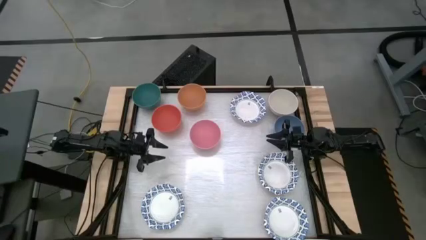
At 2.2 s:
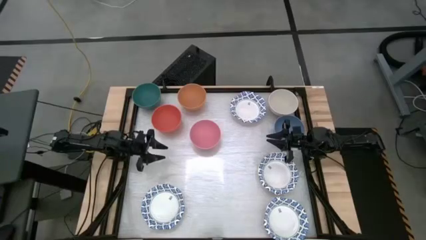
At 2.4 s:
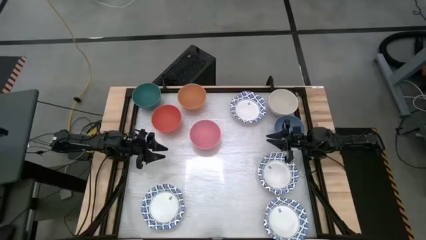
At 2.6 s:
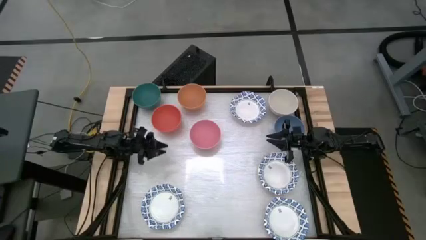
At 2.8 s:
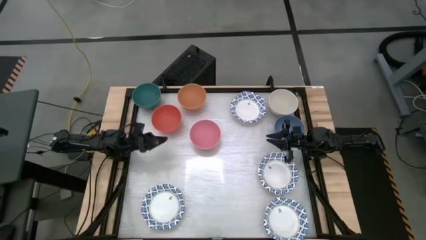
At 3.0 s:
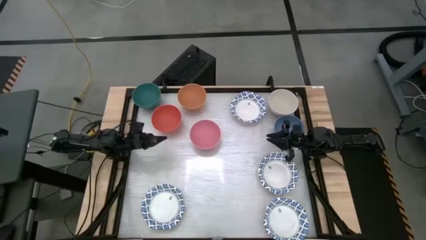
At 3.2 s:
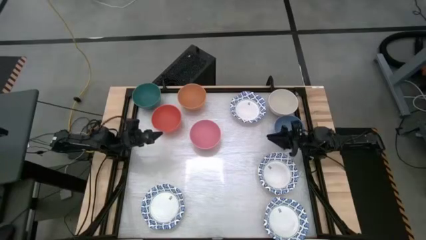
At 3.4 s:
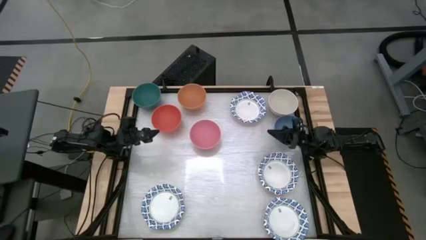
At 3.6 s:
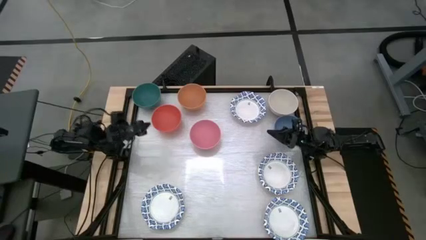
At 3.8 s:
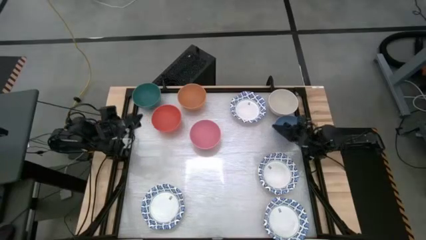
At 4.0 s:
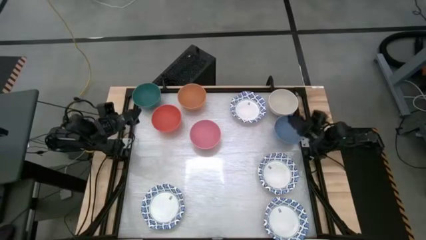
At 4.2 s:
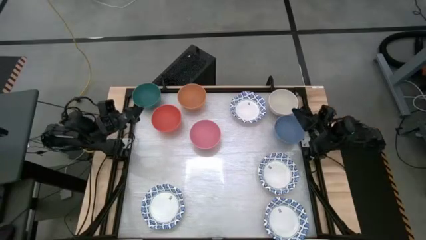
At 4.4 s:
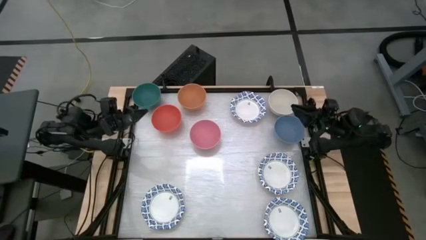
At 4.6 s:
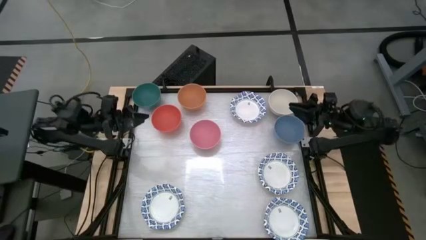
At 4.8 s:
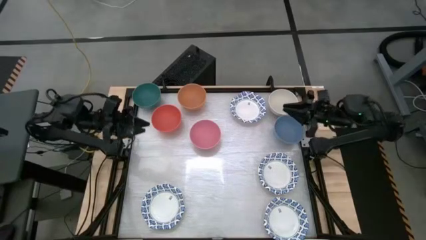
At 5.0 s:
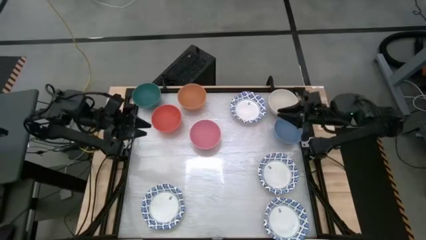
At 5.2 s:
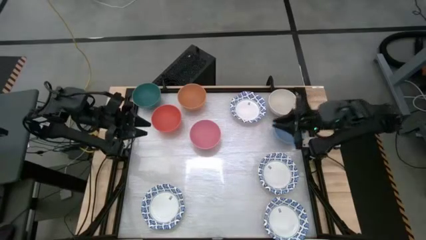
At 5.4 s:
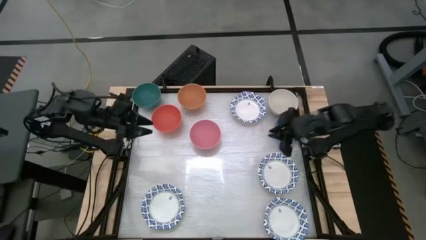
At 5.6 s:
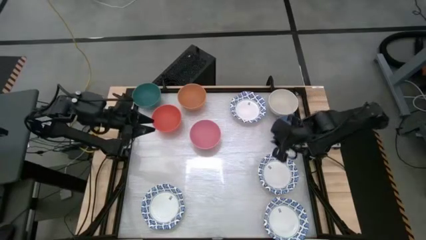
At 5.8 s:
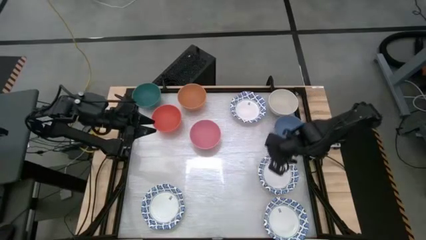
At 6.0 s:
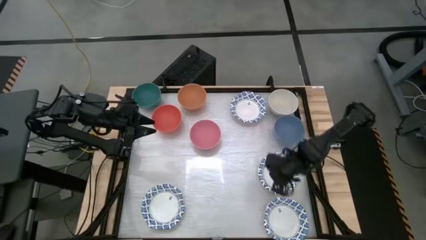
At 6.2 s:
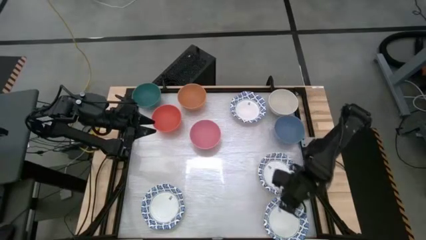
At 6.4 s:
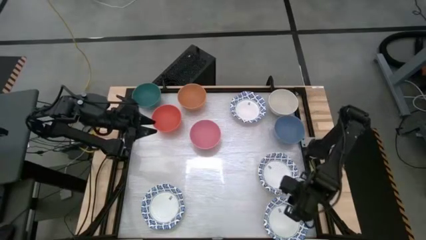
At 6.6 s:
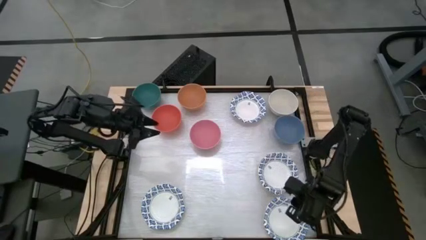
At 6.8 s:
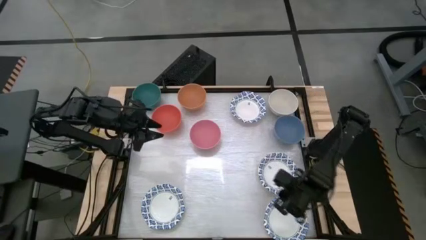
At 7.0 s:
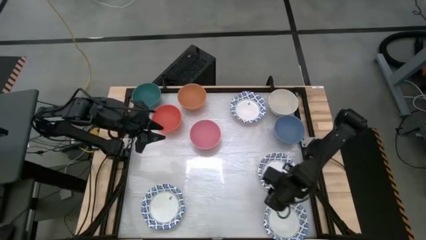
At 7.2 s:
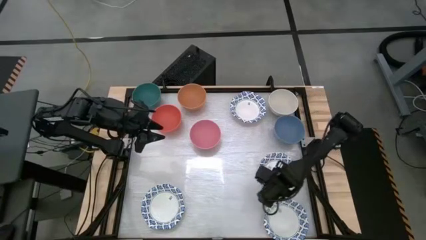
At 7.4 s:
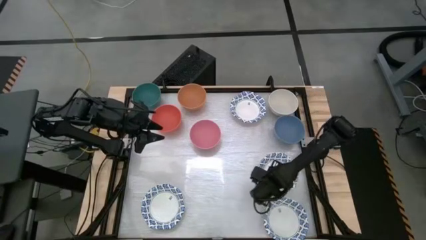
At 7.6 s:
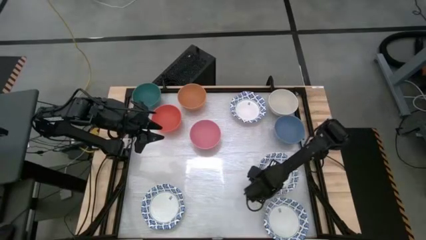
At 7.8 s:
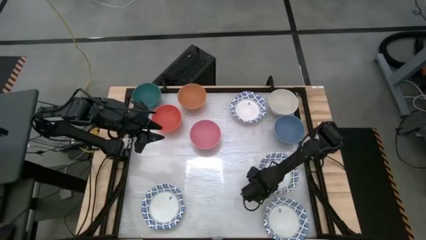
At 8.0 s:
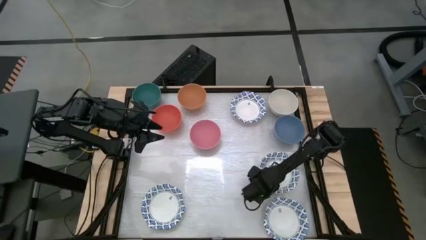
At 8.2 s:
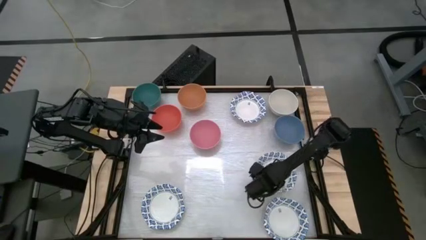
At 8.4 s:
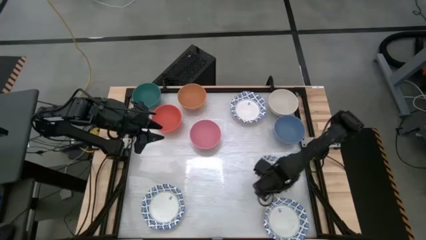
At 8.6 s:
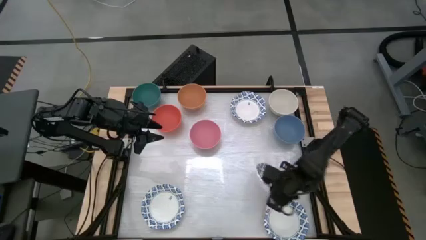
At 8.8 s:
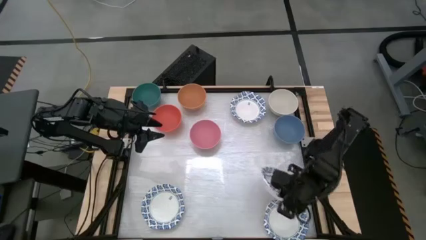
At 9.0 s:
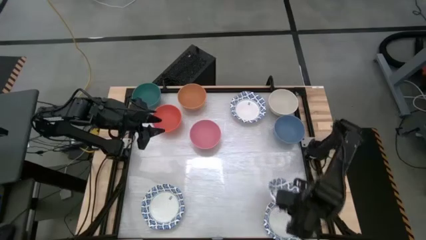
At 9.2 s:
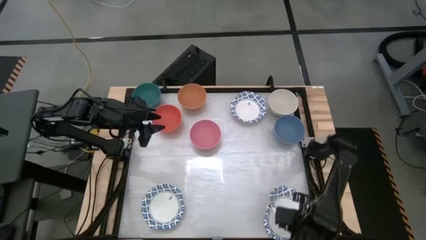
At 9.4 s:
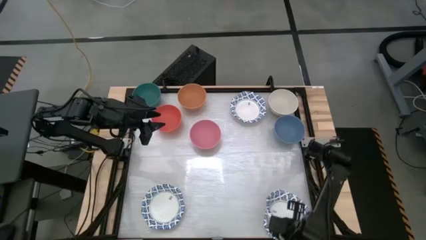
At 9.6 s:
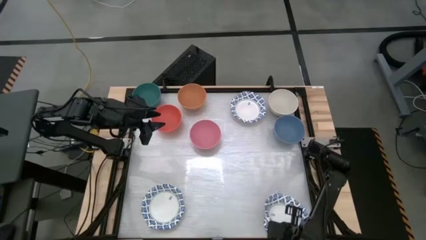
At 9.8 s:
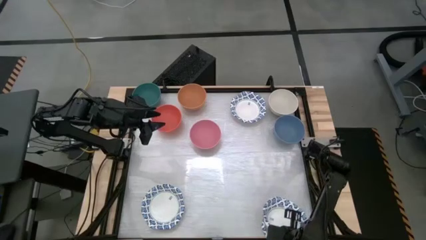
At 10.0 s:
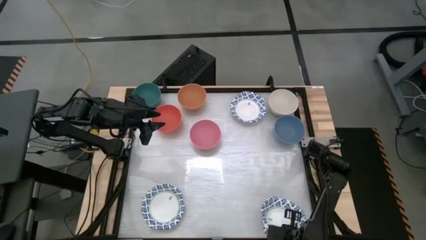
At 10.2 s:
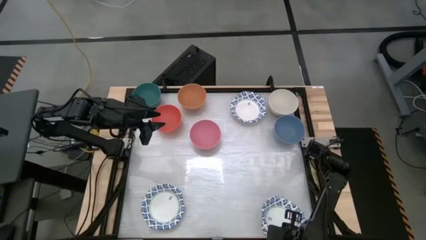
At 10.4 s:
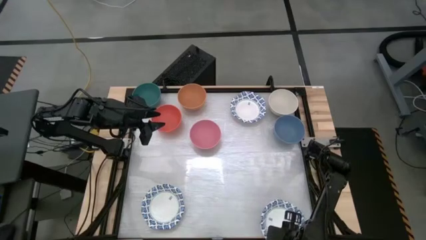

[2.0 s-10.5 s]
Stack the white bowl on top of the bottom right white bowl

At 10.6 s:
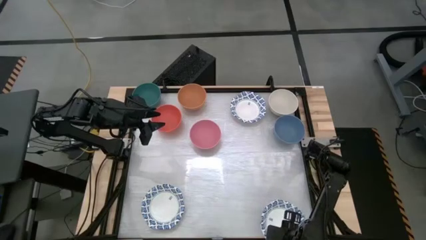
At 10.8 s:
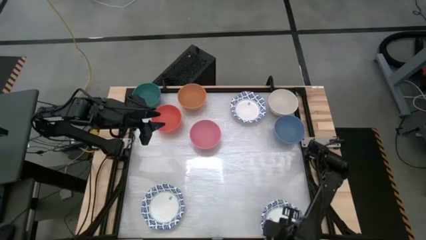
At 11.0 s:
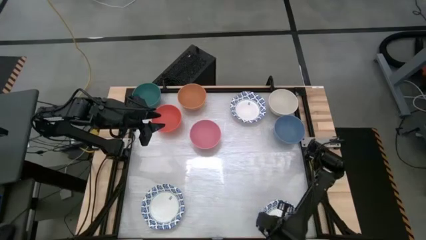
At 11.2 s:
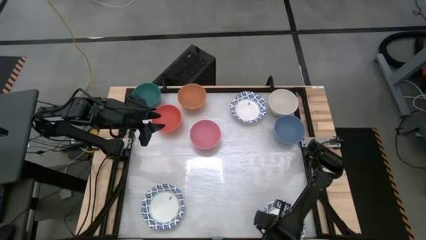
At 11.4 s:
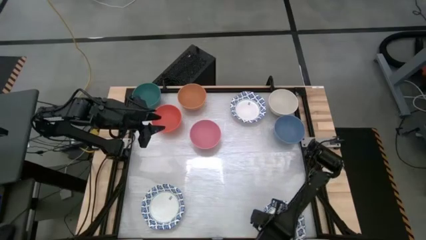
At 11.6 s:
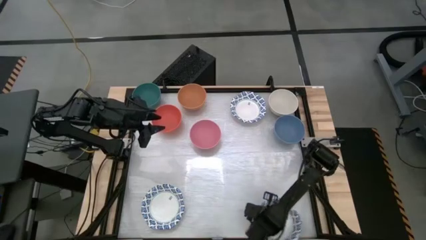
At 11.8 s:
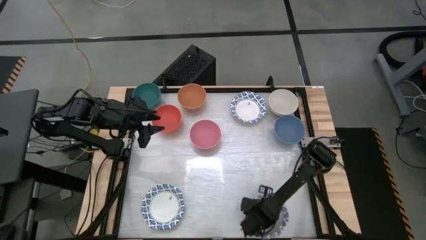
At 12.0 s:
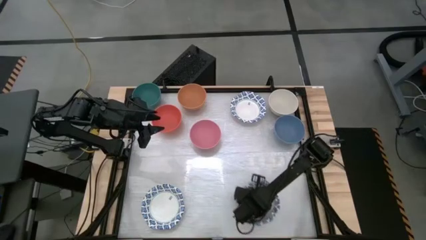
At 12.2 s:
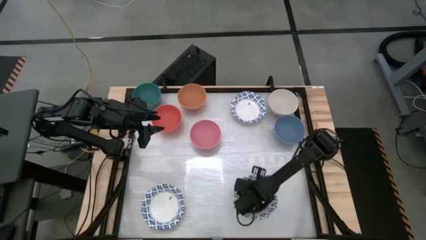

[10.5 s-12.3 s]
Adjust the stacked bowls on the table

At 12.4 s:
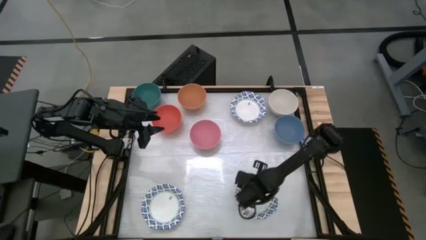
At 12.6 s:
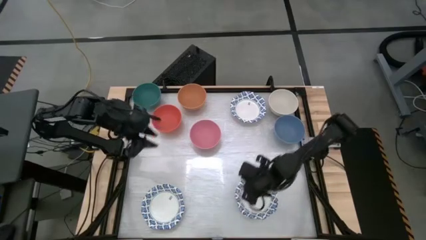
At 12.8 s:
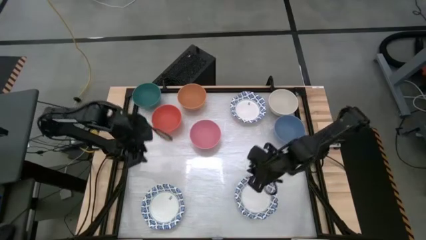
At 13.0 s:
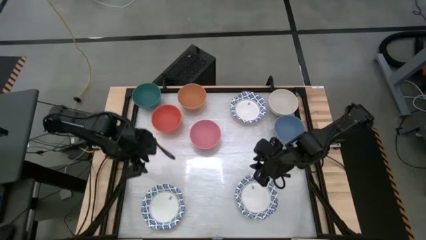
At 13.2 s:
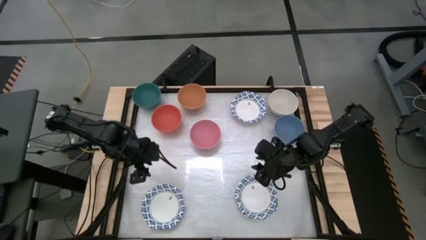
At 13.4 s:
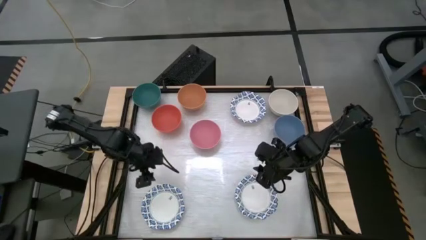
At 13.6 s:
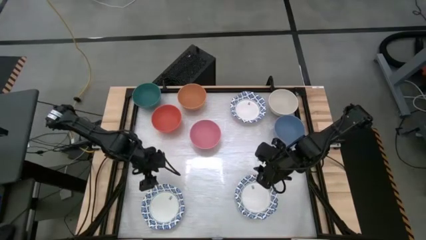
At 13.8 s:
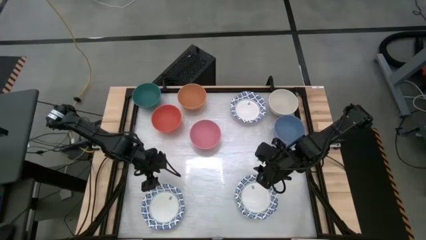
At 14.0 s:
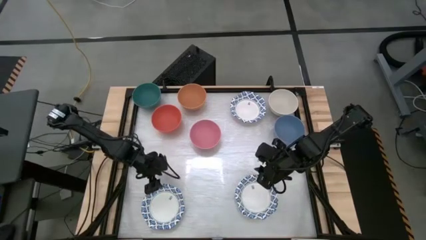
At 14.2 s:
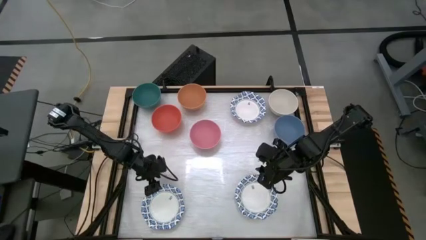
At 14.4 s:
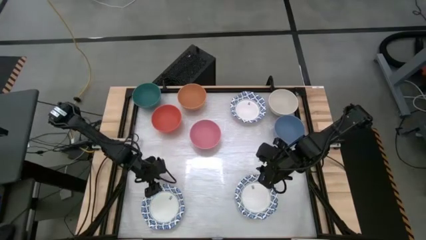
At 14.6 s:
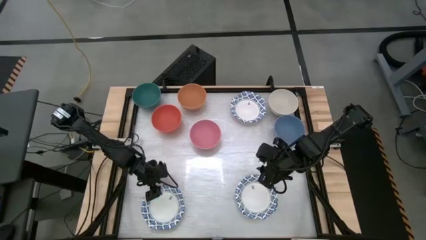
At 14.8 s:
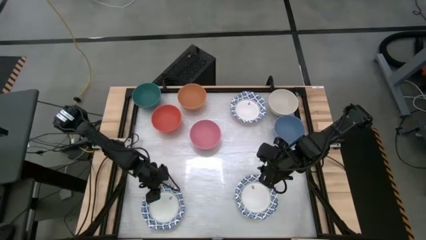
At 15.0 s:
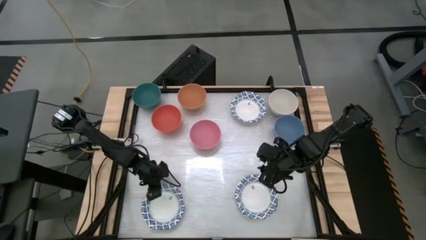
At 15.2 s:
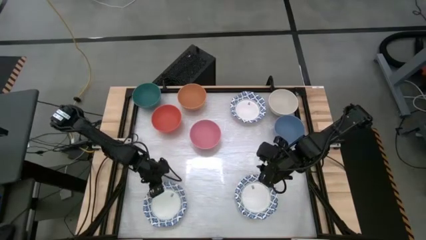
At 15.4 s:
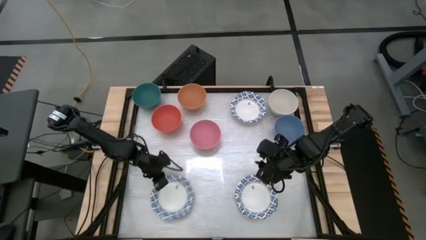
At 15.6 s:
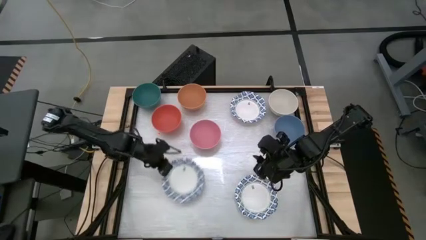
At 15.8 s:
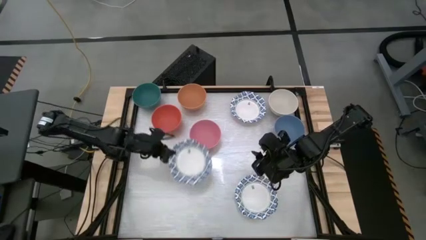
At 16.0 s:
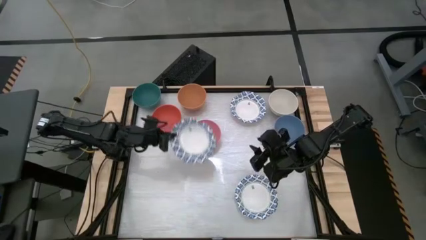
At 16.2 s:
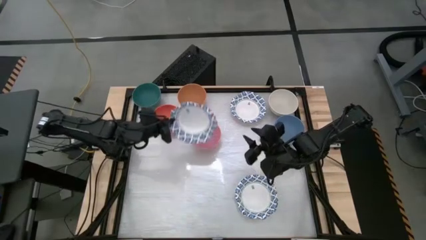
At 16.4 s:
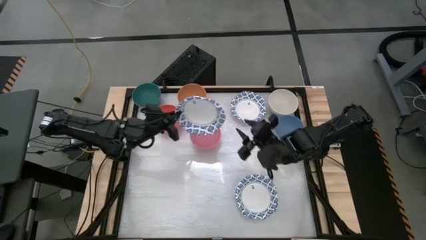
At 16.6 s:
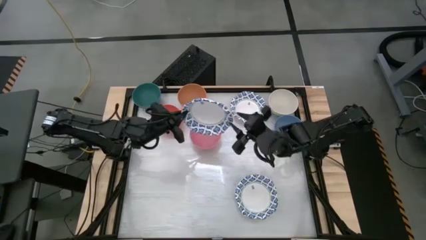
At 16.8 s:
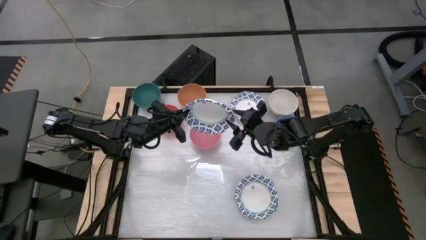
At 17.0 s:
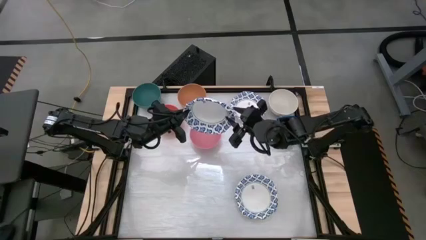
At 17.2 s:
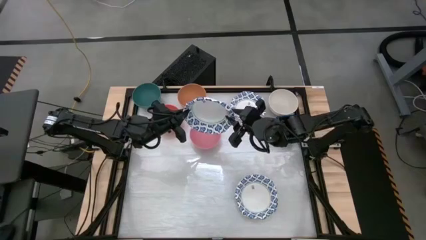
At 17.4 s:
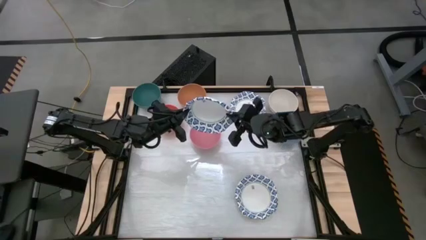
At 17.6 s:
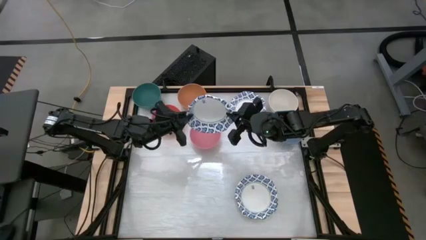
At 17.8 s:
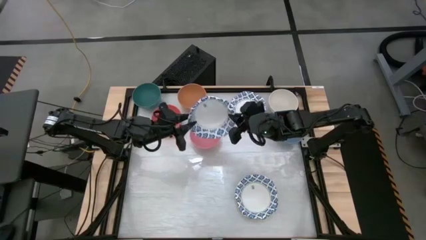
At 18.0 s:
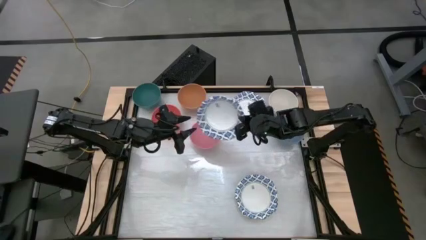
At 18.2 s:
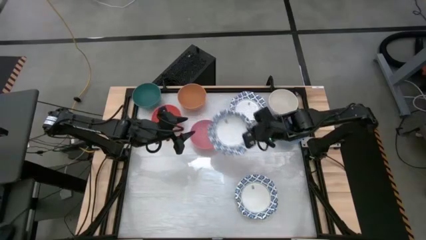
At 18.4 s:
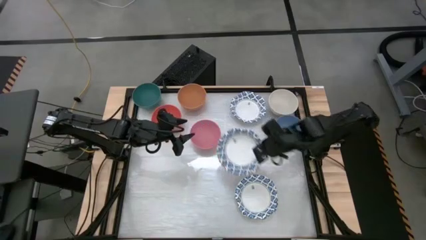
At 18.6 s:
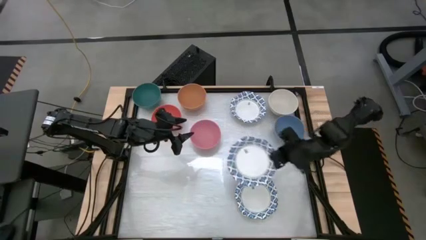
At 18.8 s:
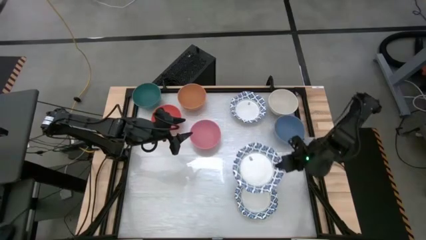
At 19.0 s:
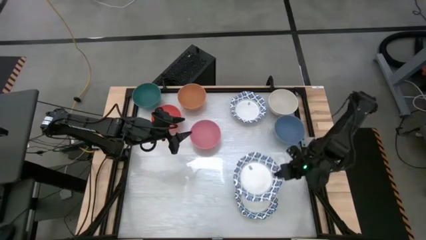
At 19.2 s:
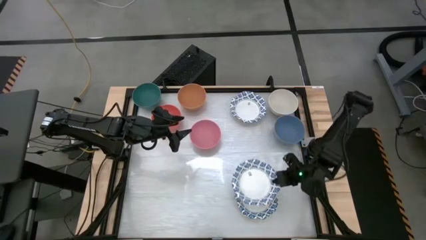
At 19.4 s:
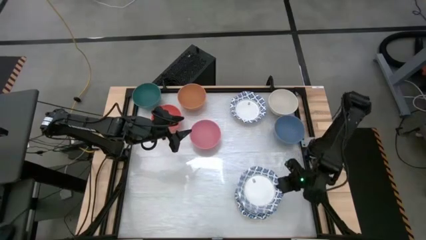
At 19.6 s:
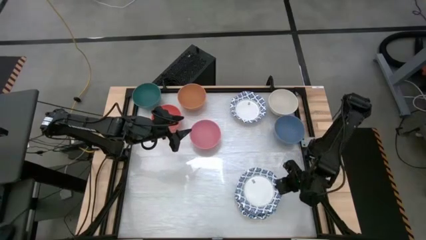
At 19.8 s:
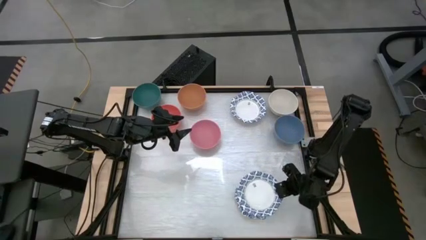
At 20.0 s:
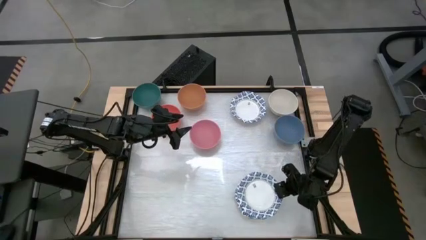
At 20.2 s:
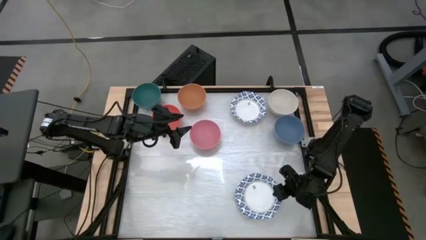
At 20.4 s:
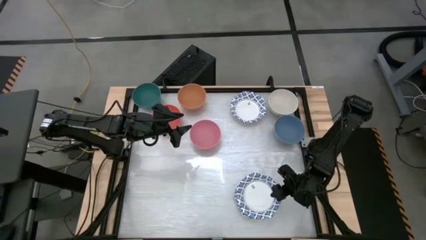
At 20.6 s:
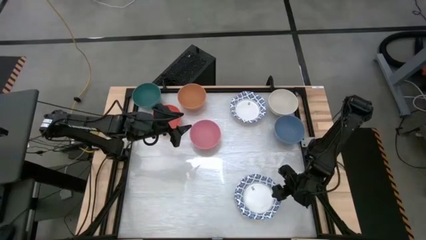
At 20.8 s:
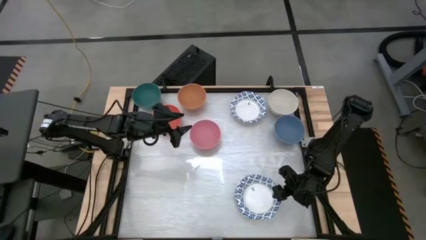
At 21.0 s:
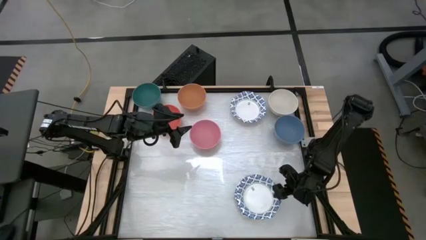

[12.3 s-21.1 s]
Stack the bottom left white bowl on top of the bottom right white bowl
